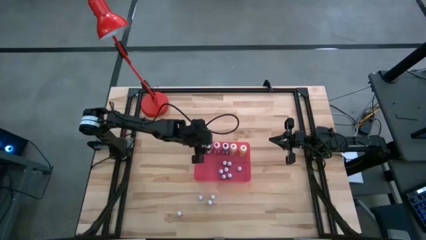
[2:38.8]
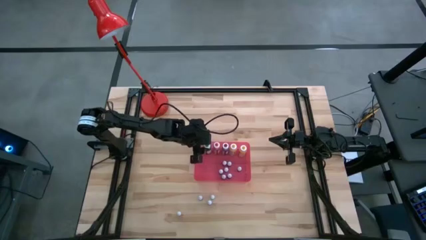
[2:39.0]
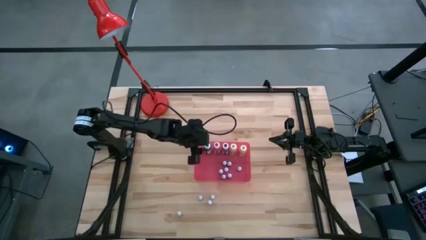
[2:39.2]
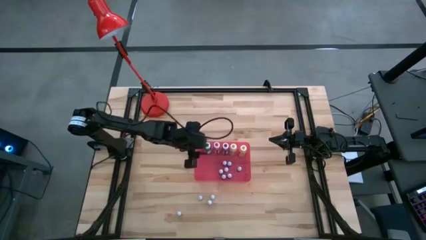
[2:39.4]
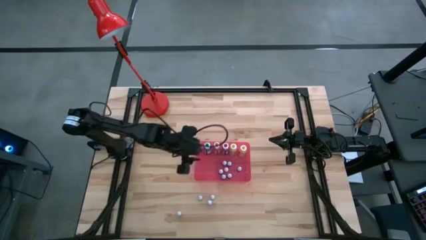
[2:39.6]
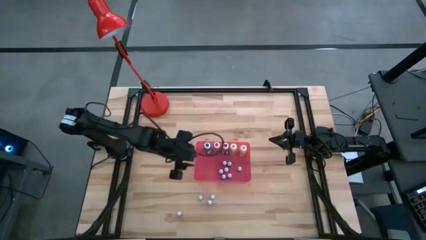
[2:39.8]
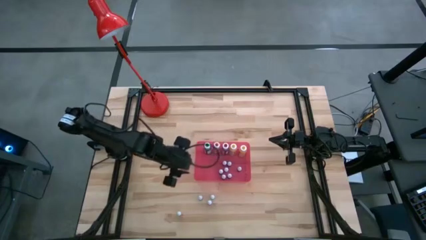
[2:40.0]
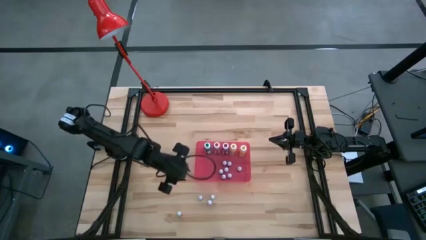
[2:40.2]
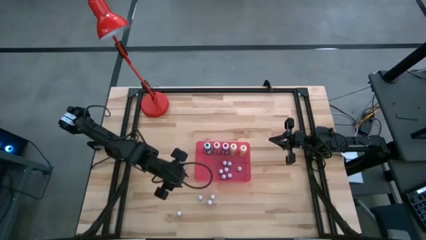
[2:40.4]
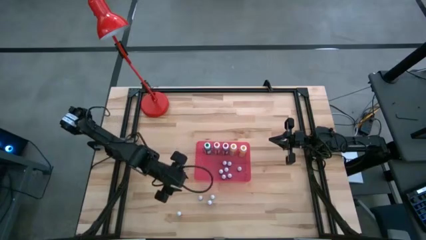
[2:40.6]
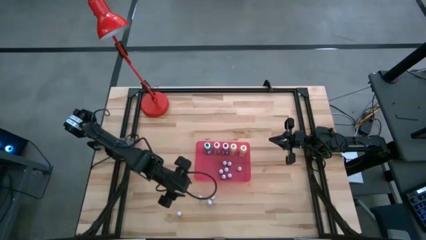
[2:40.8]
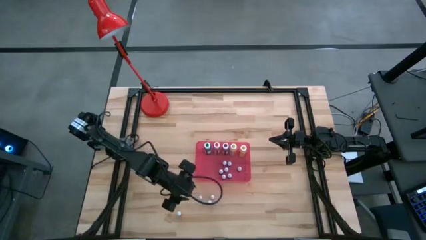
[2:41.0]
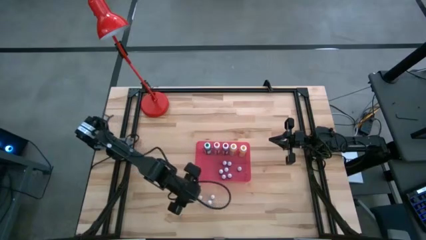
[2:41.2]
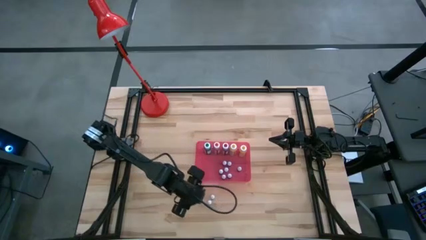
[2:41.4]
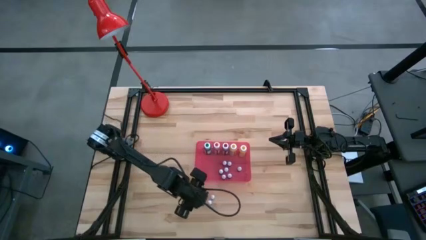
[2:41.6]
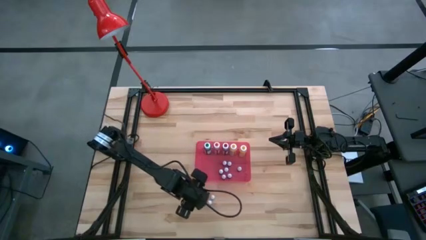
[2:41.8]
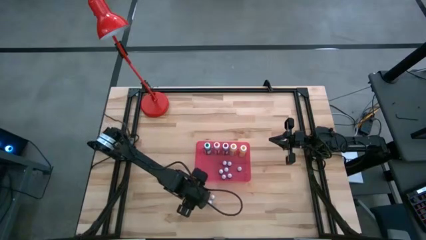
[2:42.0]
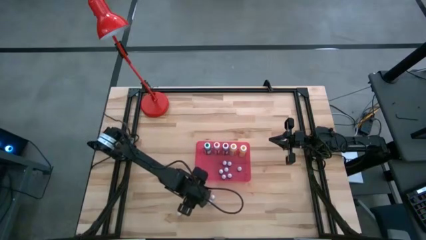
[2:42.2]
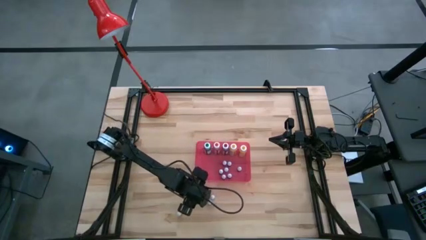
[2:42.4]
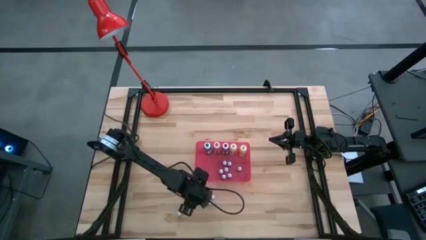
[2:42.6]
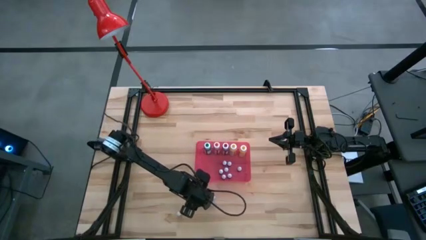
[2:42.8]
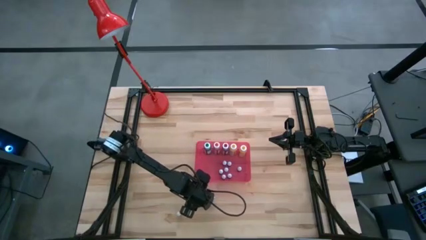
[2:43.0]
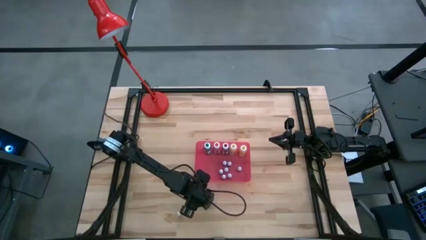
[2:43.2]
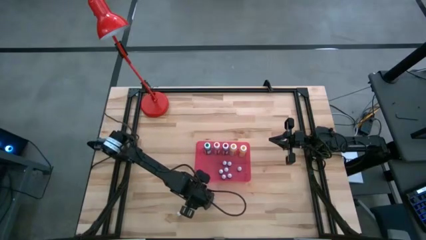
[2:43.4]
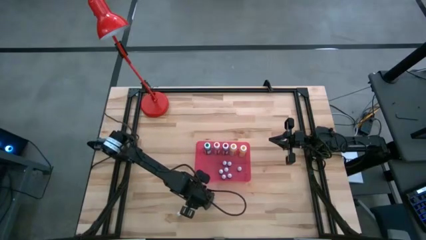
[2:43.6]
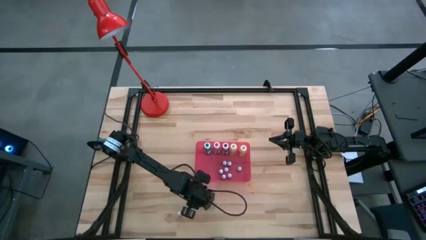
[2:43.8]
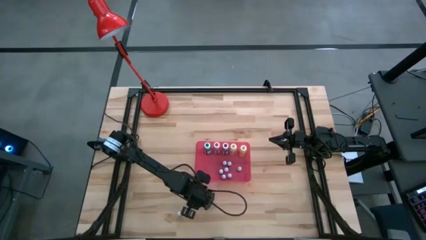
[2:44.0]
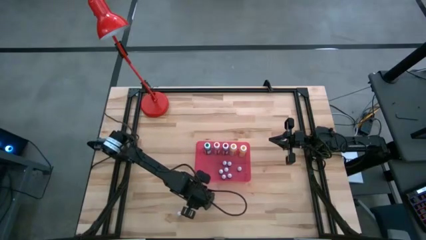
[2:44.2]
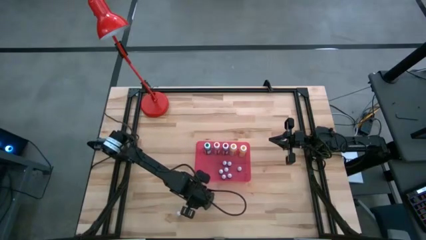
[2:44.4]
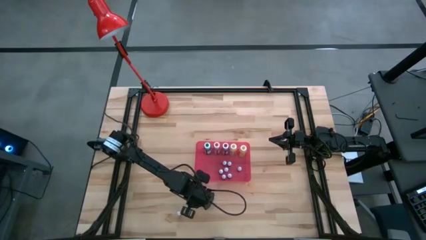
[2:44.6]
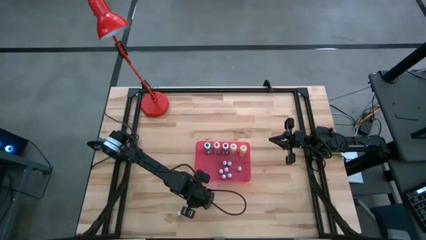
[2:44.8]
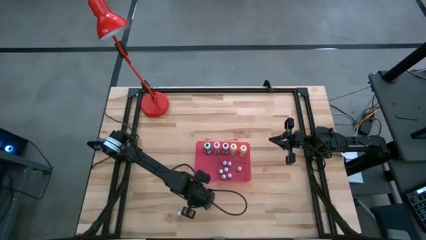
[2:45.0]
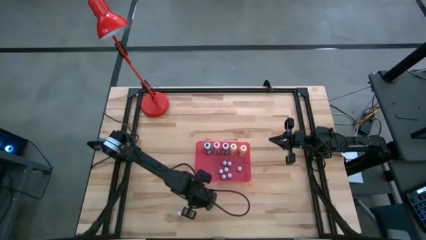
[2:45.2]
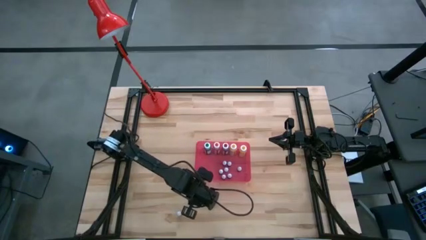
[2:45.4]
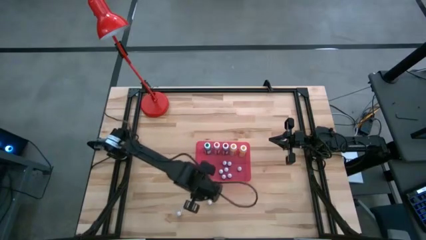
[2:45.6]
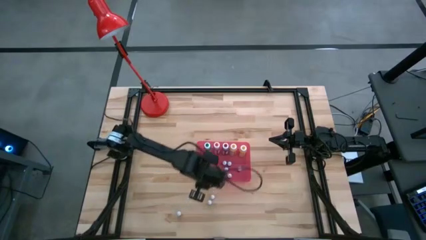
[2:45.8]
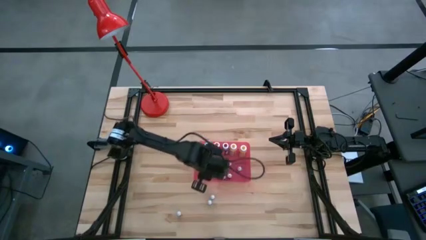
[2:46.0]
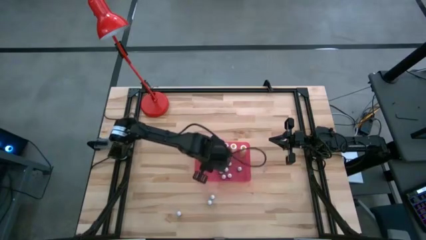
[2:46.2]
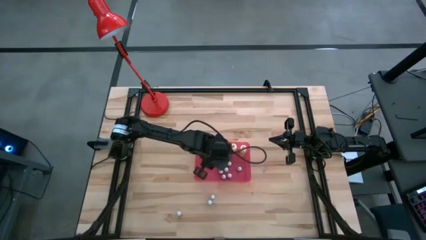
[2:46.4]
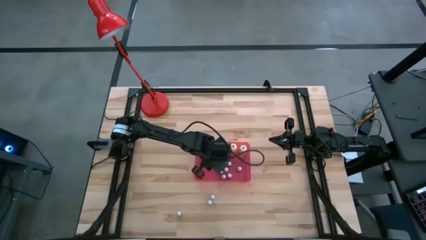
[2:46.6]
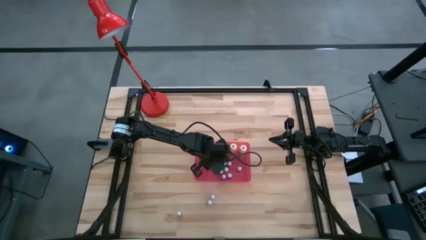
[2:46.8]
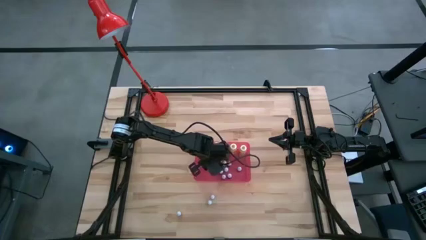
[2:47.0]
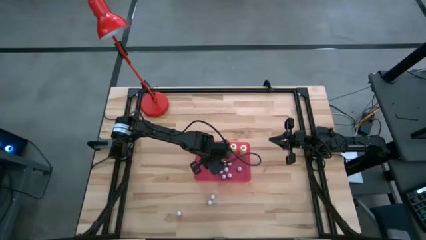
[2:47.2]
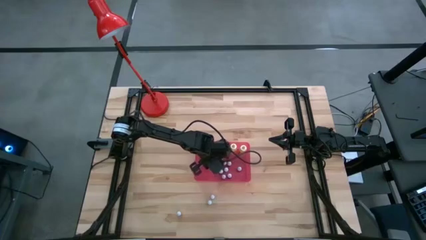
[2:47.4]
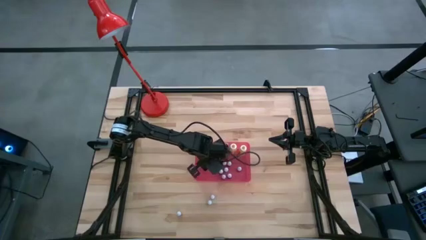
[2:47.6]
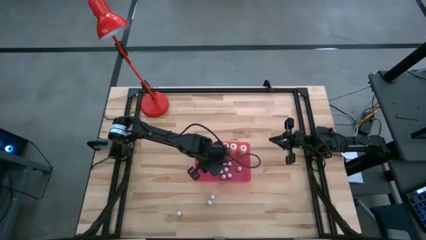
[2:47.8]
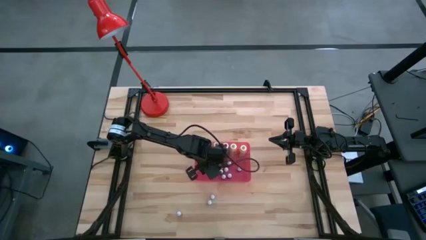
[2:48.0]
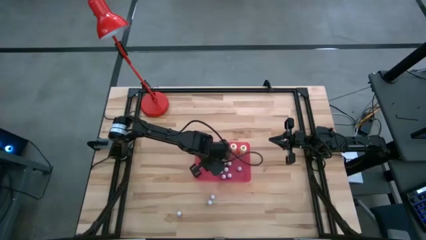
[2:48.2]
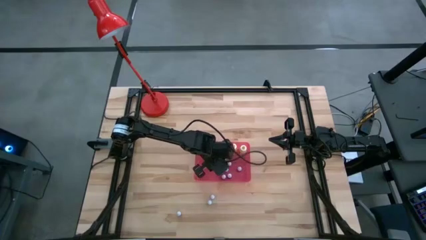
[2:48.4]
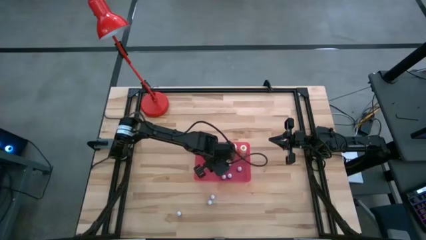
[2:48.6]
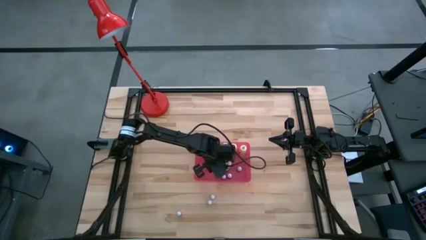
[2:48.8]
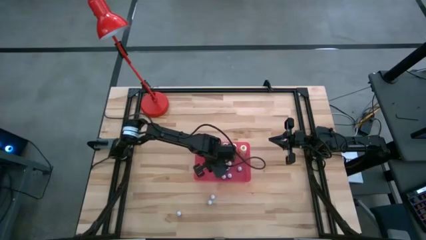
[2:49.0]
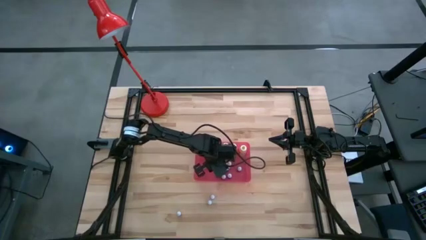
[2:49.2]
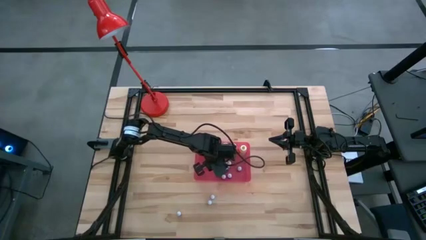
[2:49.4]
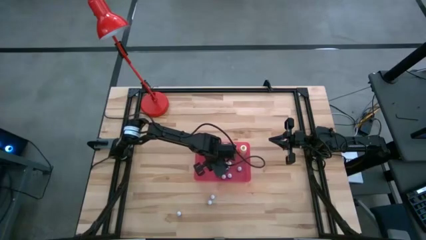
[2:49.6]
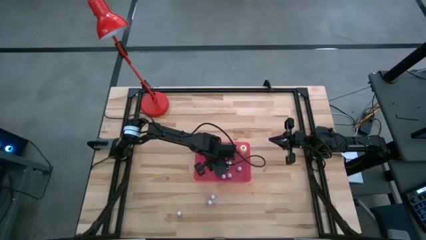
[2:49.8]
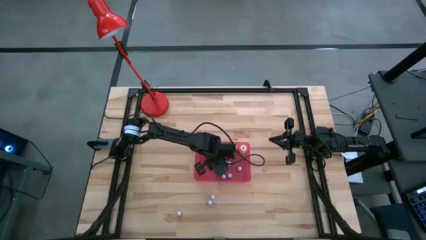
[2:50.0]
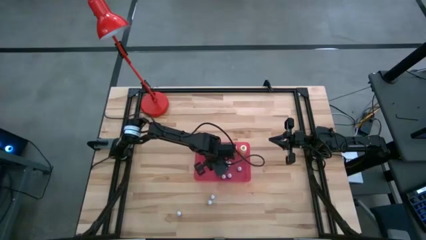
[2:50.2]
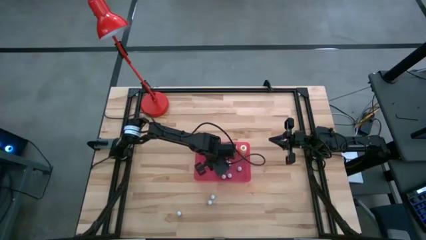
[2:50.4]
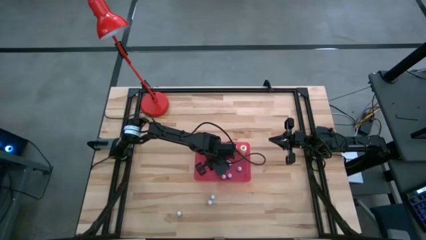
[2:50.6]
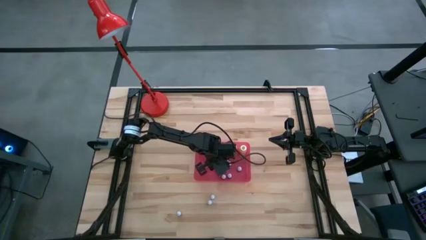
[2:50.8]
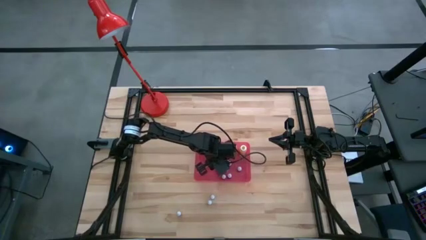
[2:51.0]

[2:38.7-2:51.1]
Task: Pick & Place food coloring
Put the left small green food coloring bottle into the container

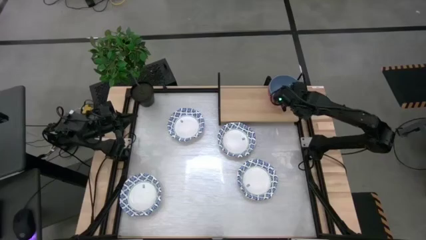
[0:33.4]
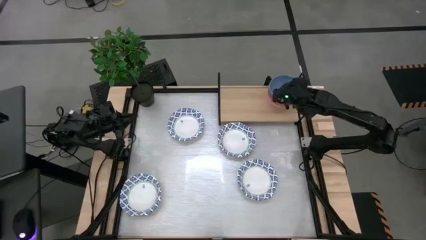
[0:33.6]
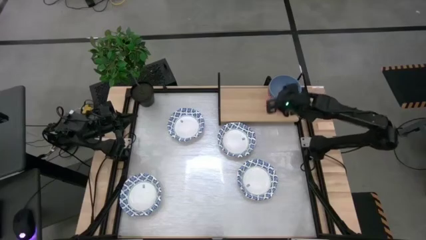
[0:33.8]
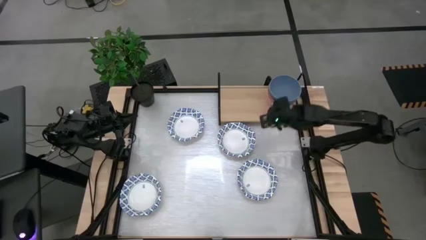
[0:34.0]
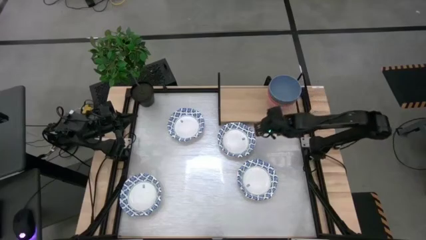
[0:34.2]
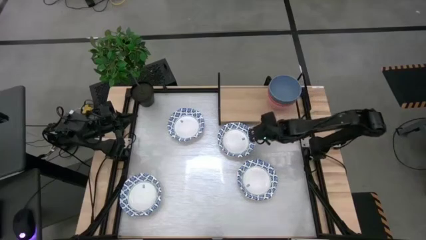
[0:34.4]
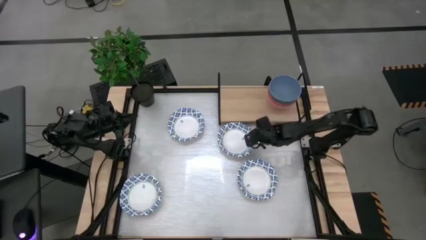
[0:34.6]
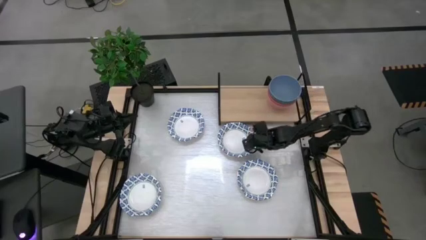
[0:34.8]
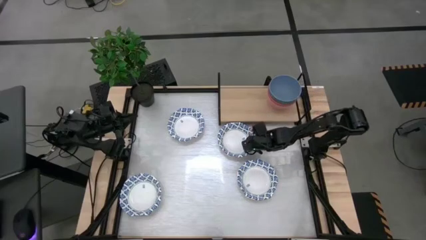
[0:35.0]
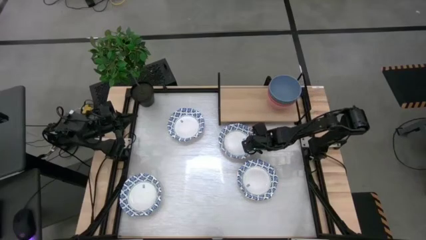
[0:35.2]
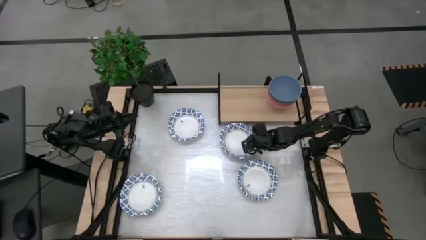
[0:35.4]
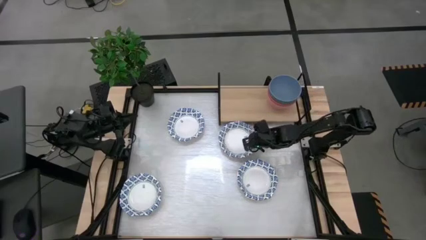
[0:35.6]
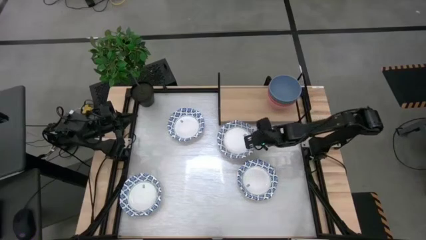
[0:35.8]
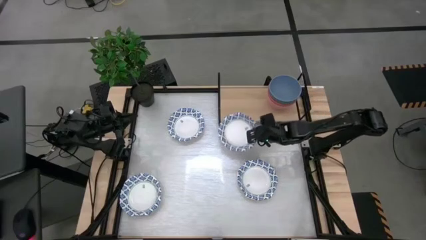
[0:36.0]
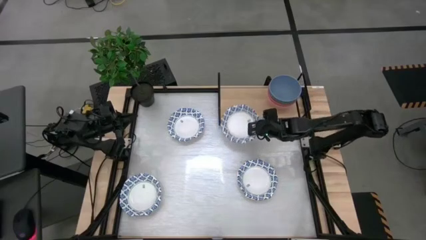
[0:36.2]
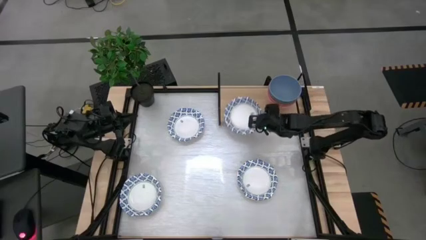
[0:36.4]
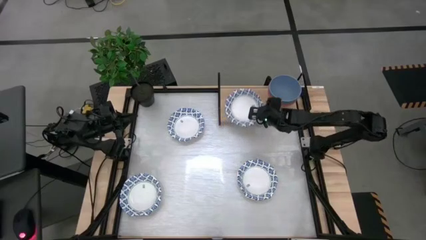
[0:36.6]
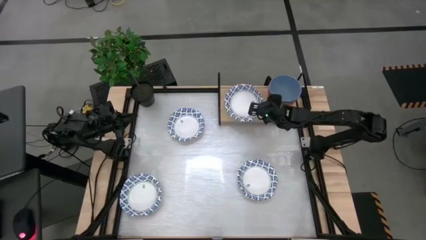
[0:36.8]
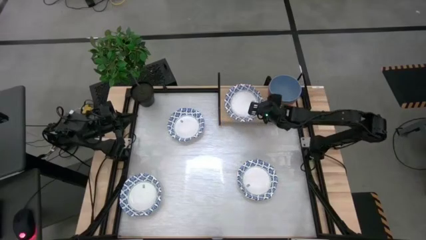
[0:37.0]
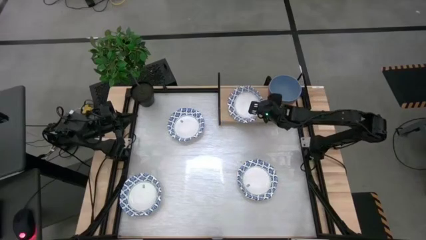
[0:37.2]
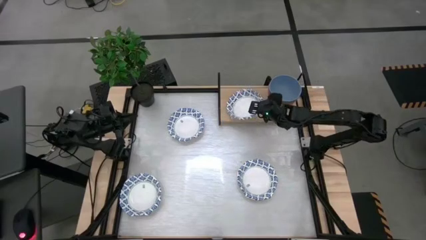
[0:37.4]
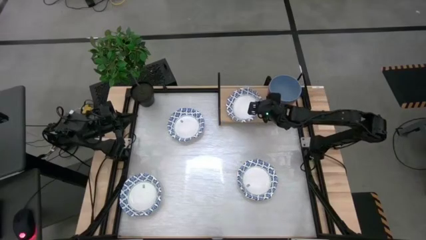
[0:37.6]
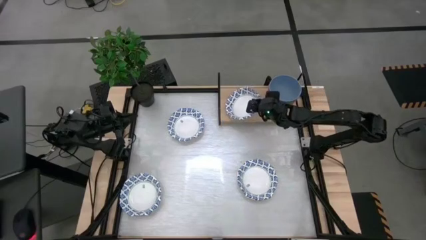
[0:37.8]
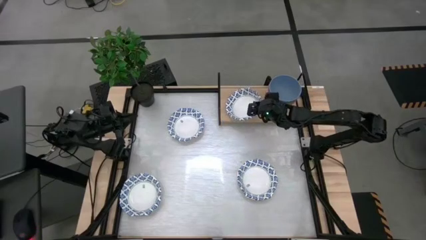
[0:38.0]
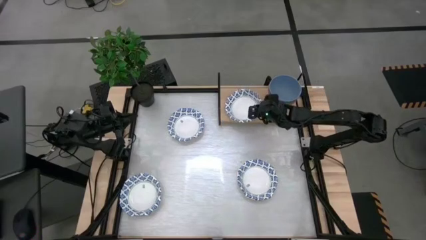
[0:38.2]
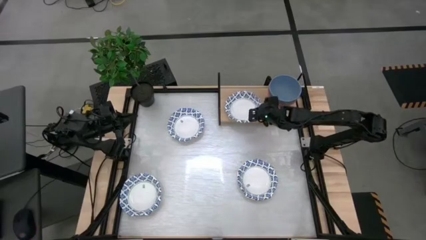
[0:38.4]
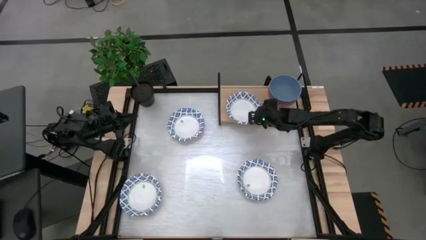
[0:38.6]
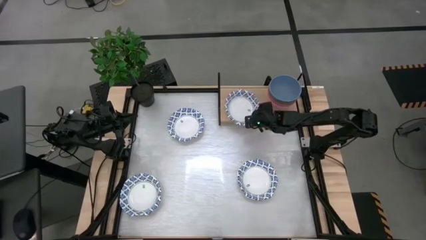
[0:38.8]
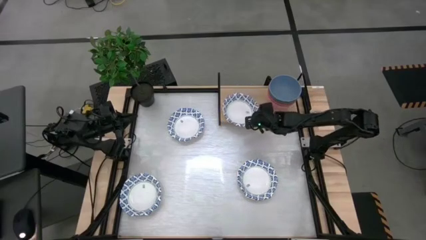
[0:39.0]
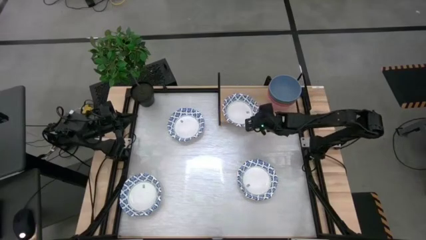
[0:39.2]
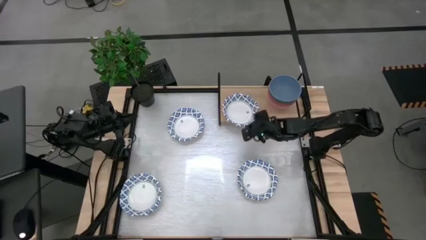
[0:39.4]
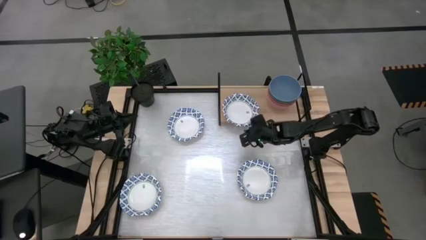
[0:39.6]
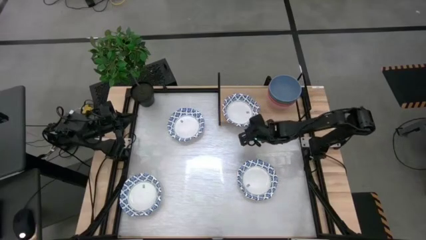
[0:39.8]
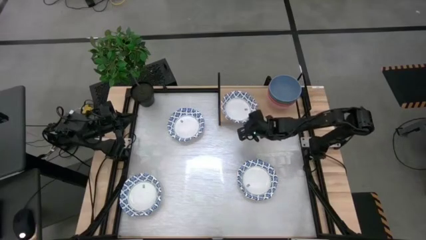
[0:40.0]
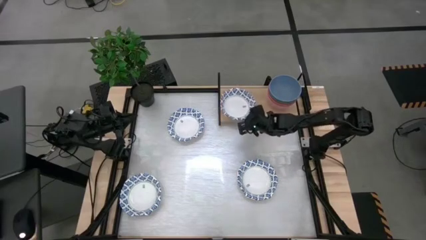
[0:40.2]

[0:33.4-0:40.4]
Task: Place and stack bowls onto a shelf
Put the top right blue pattern bowl on the shelf
